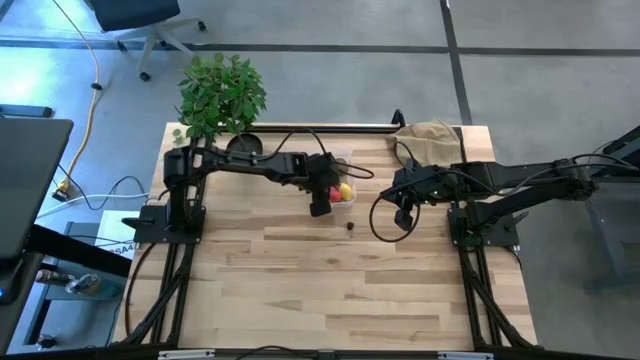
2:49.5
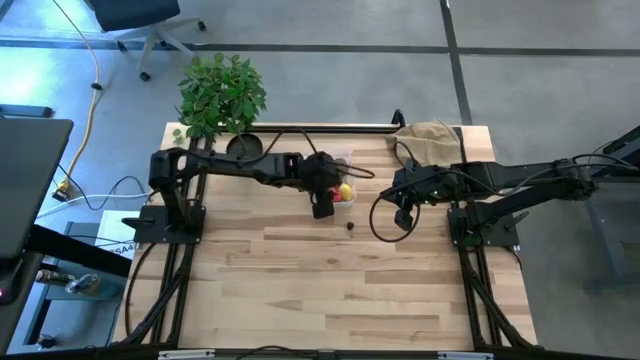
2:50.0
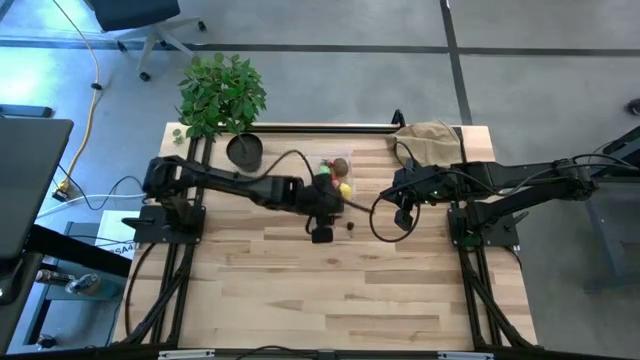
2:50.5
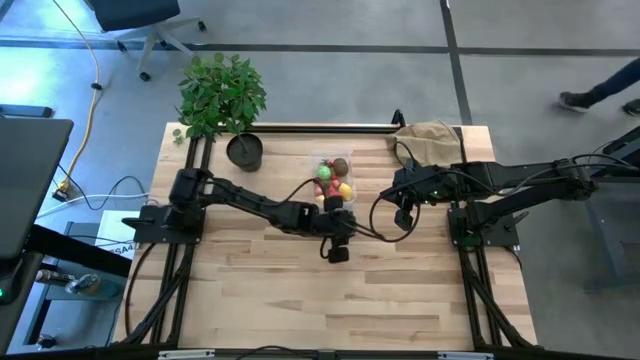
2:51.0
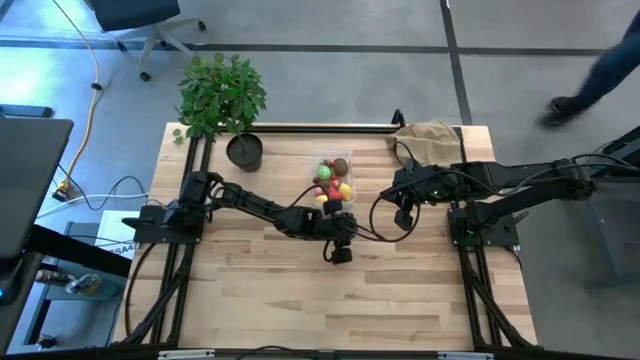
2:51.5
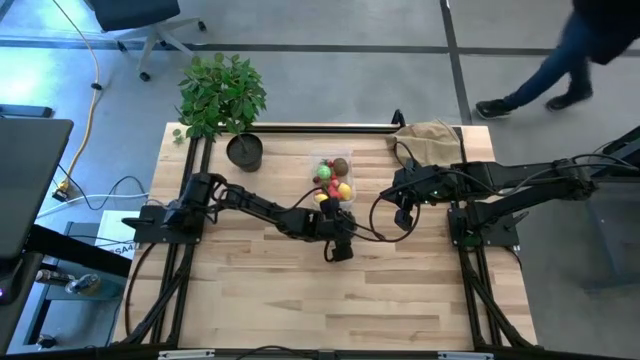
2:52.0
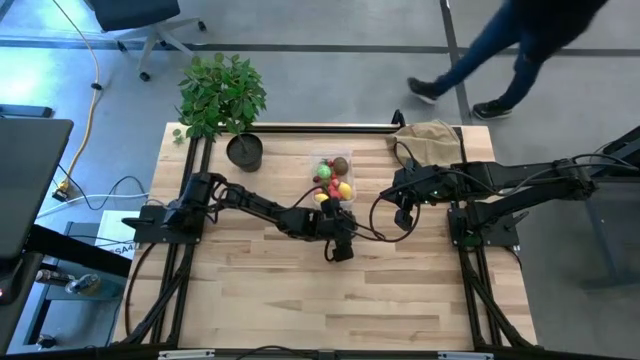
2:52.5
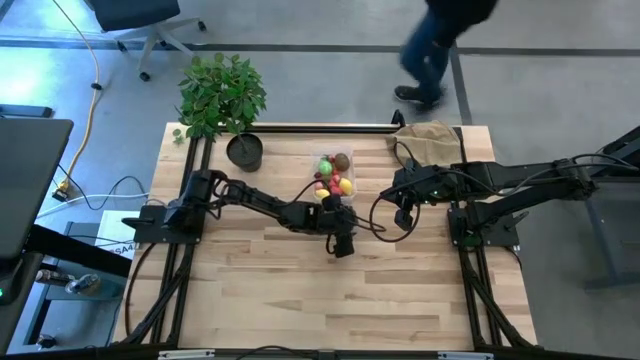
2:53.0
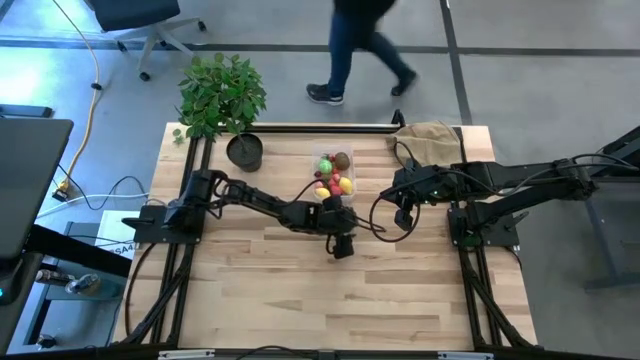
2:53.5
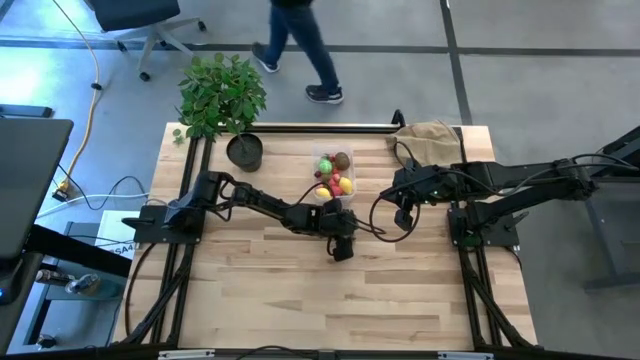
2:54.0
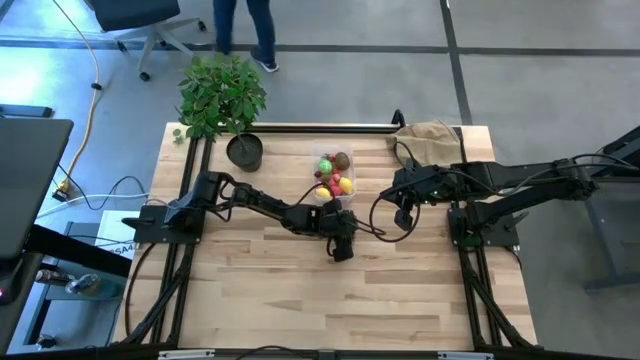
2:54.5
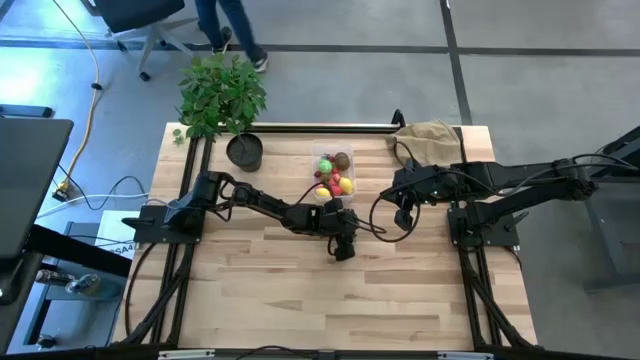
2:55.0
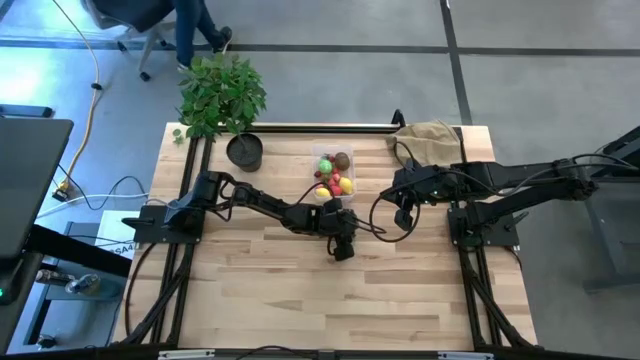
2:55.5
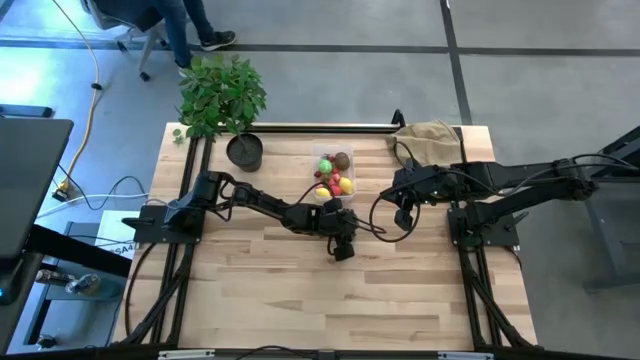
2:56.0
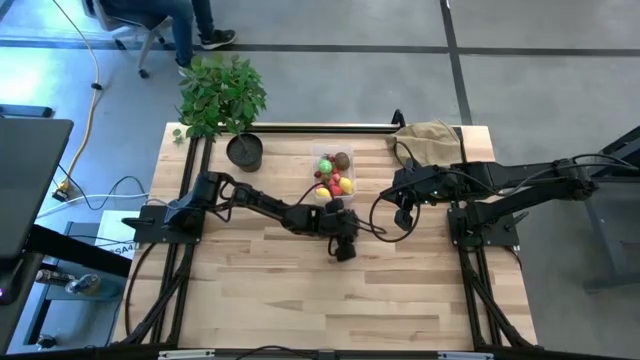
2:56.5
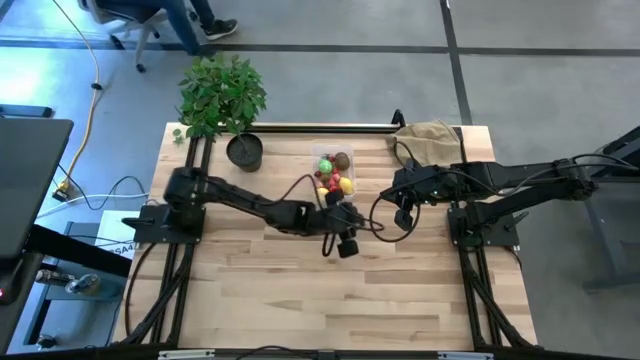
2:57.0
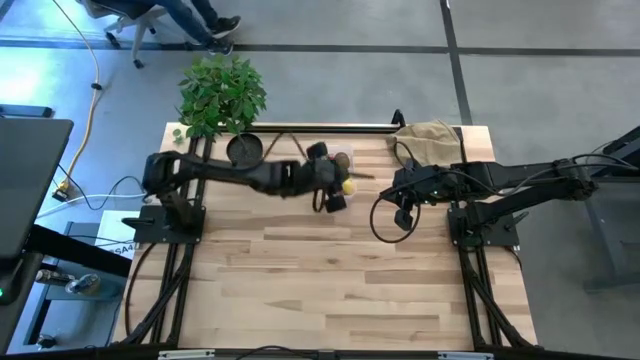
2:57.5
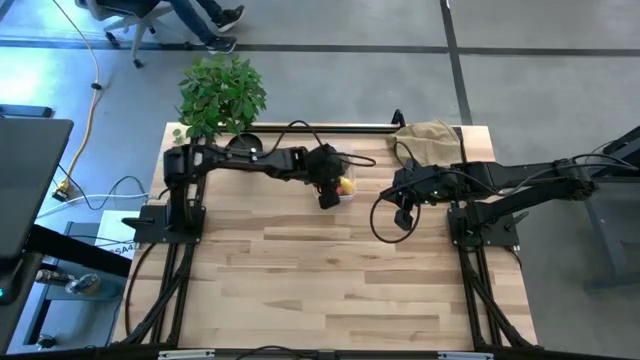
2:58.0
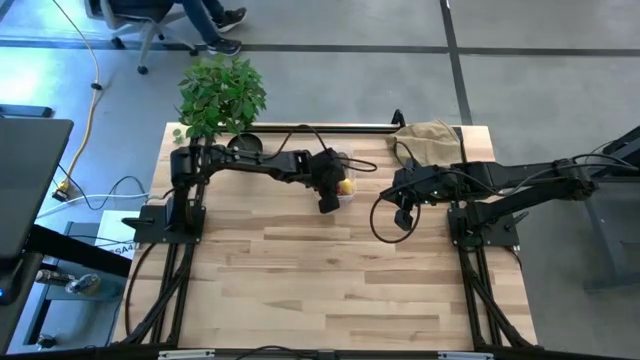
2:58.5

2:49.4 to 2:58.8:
Task: Pick and placing Produce into tupperware
Put the blackberry into the transparent bin

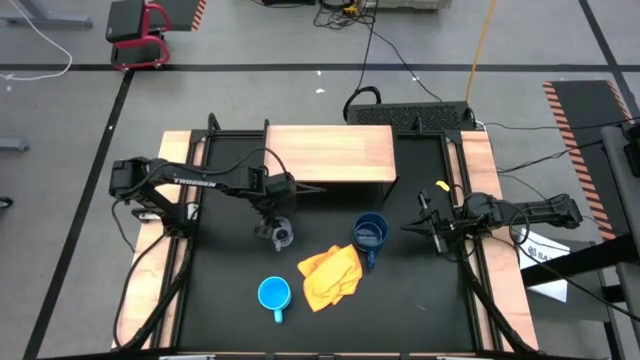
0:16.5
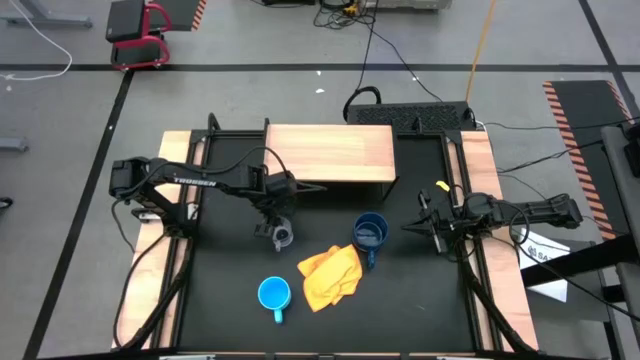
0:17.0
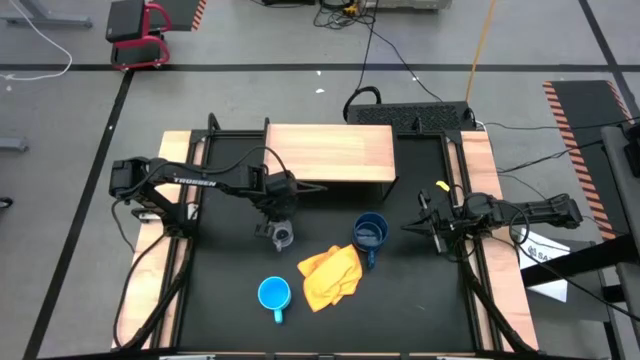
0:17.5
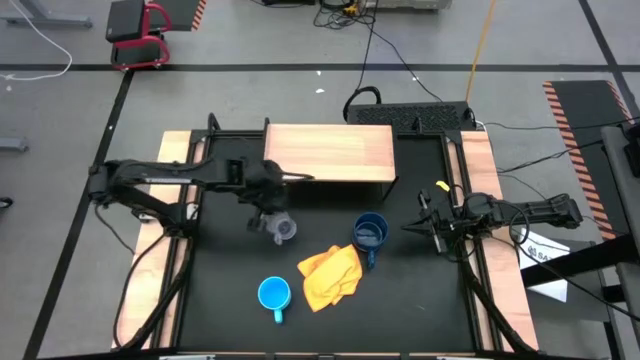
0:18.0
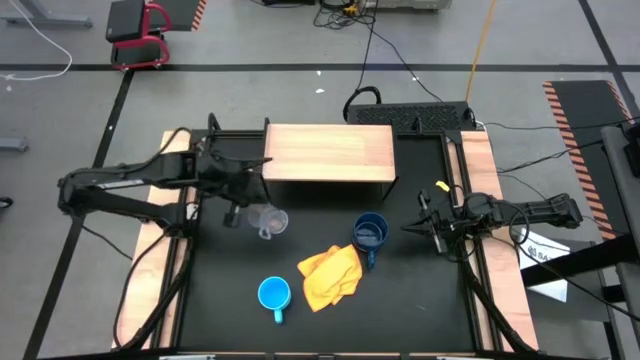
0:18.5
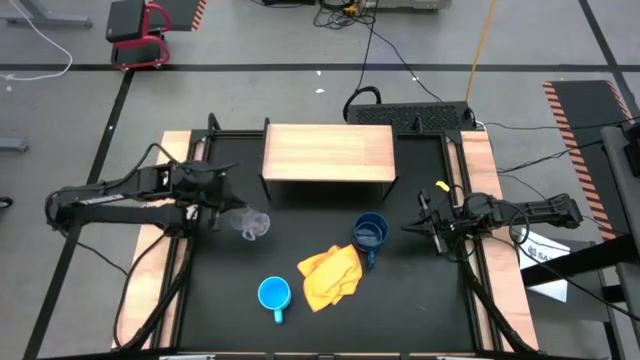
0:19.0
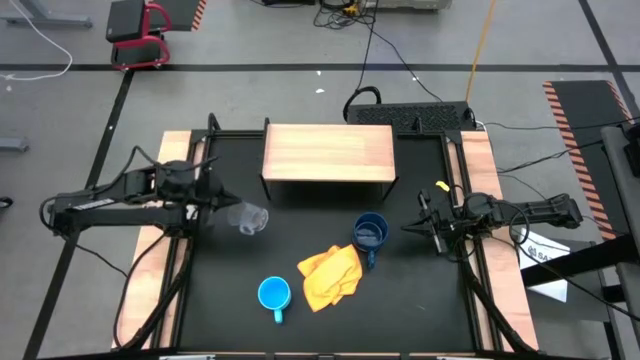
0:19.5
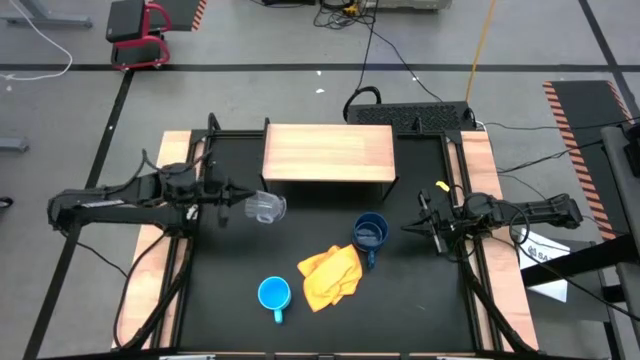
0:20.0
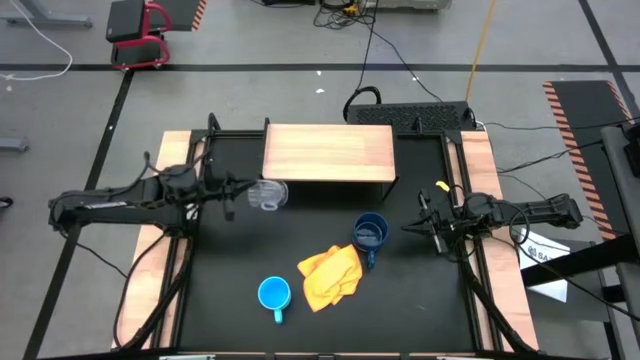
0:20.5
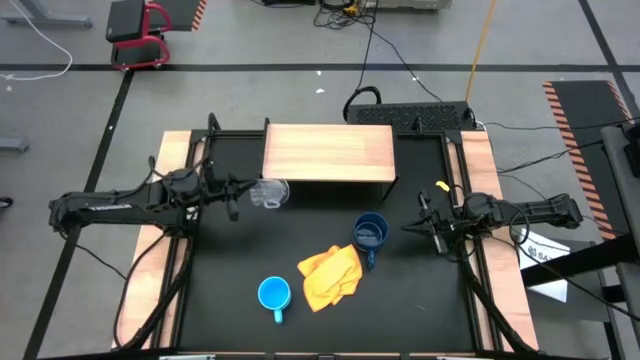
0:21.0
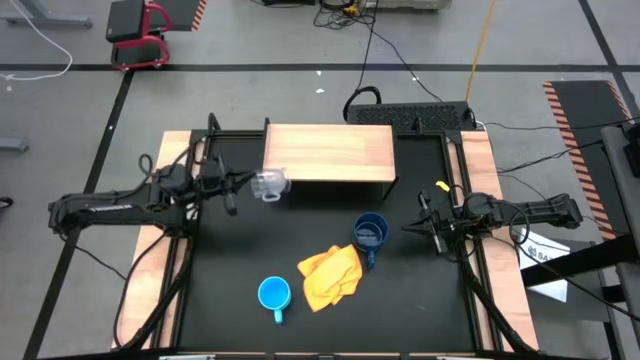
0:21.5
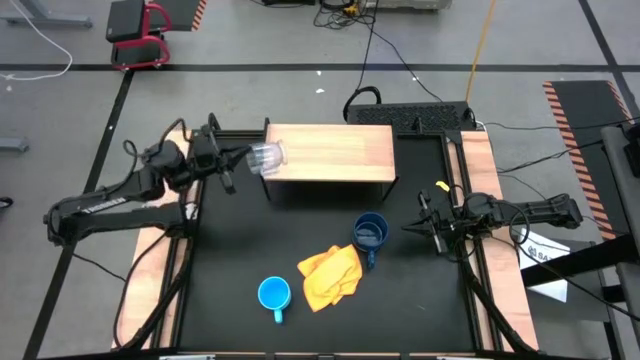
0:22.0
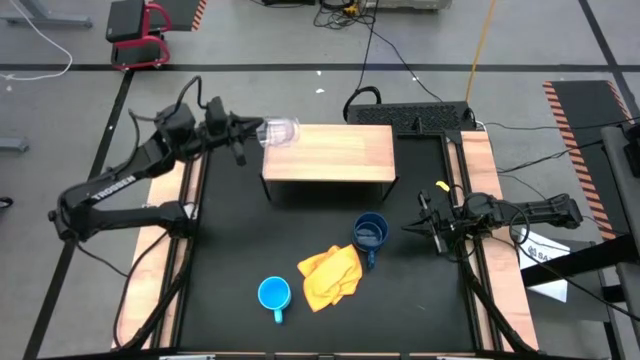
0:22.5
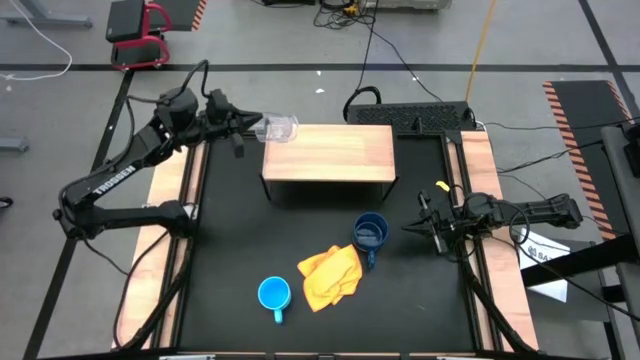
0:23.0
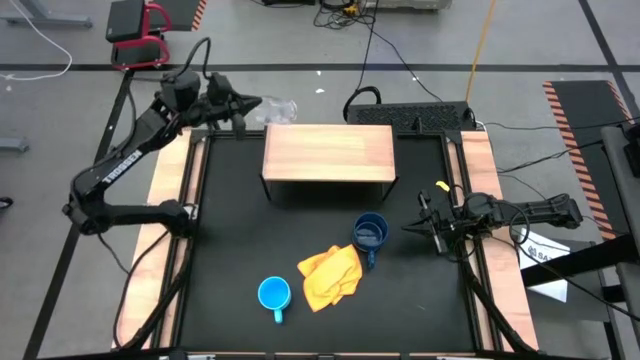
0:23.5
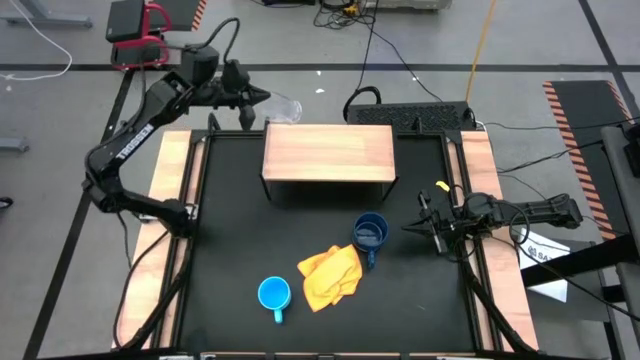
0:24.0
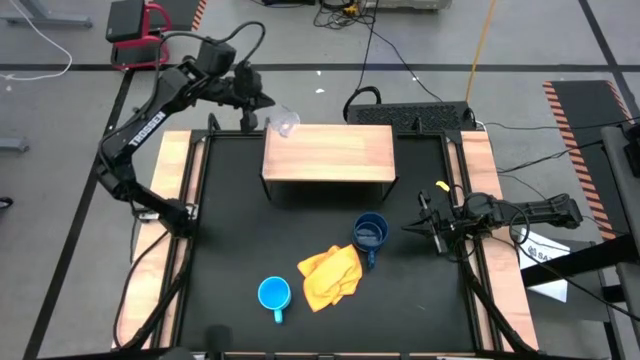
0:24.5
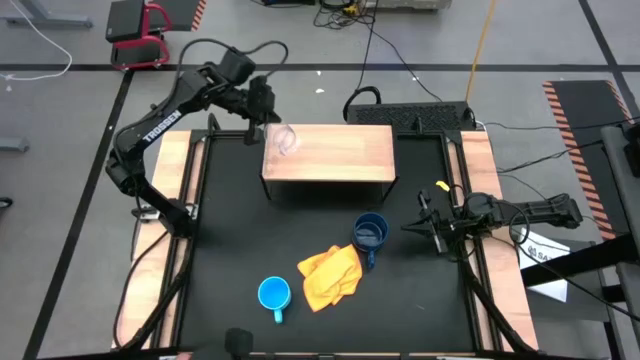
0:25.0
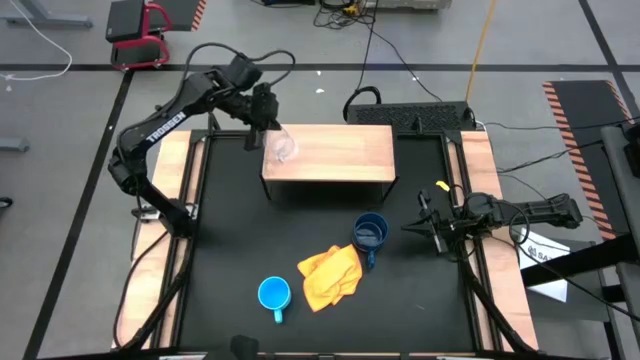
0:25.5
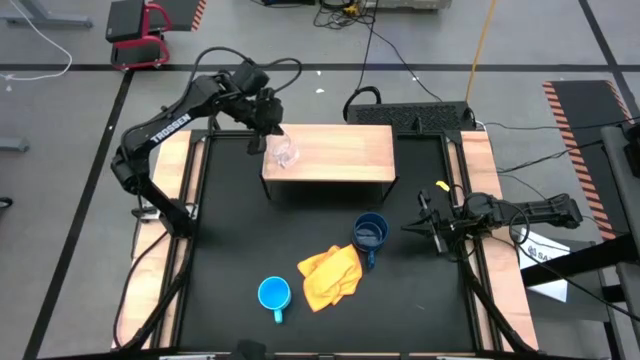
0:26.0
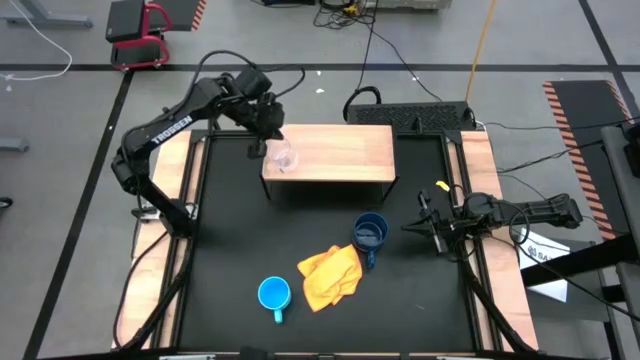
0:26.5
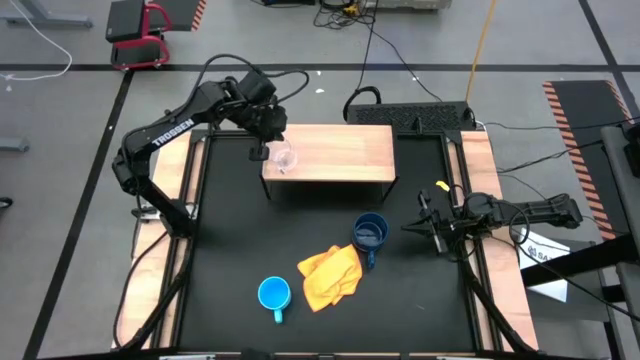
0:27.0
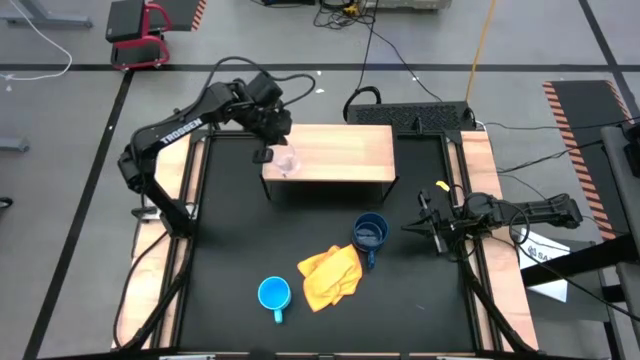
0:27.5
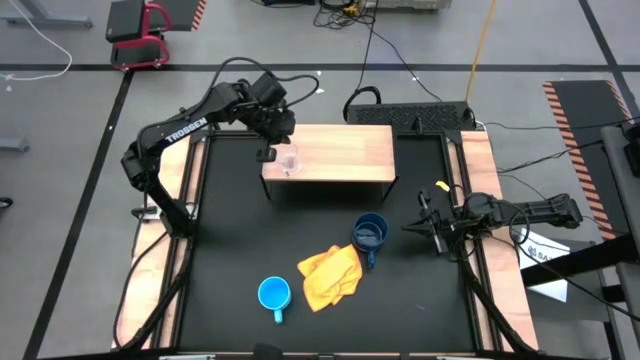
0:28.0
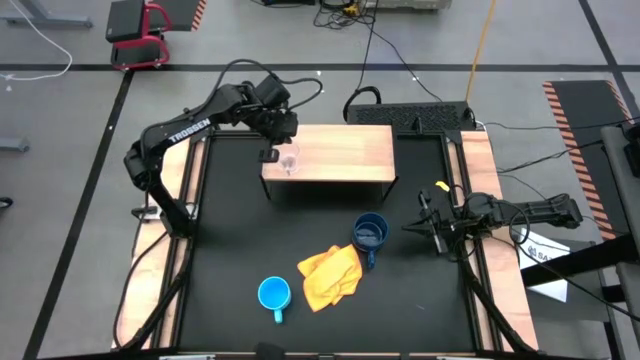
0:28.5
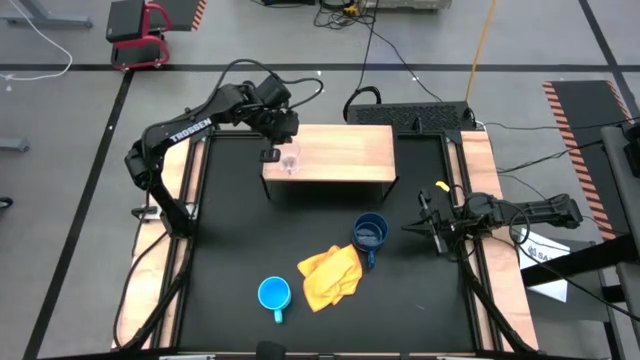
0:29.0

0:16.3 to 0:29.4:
Task: Stack small to large cups/mugs on shelf
Put the transparent mug on the shelf
